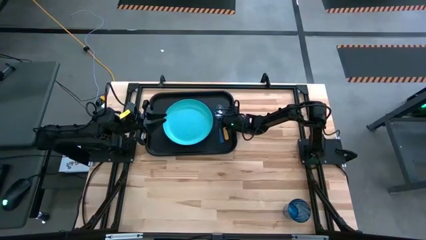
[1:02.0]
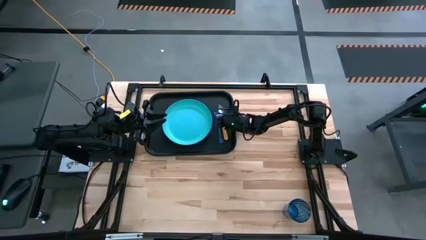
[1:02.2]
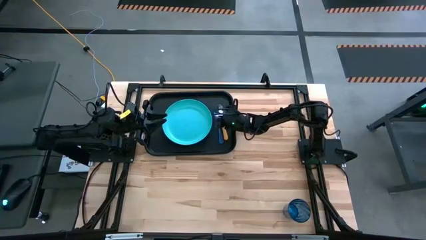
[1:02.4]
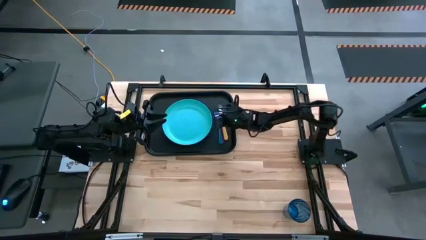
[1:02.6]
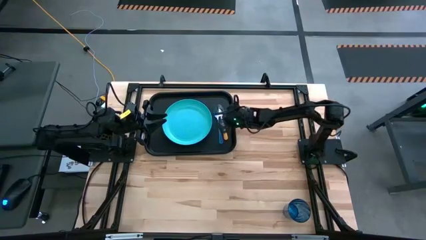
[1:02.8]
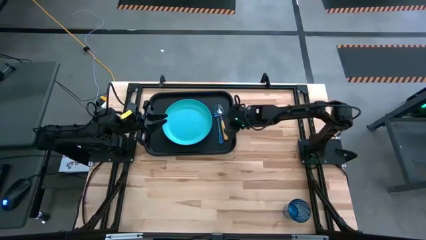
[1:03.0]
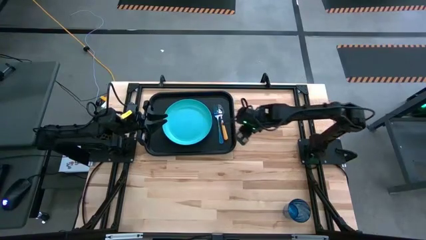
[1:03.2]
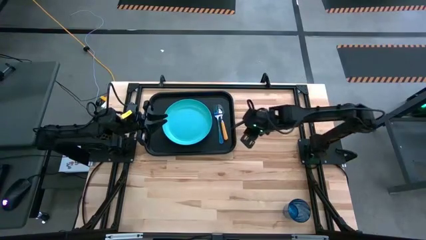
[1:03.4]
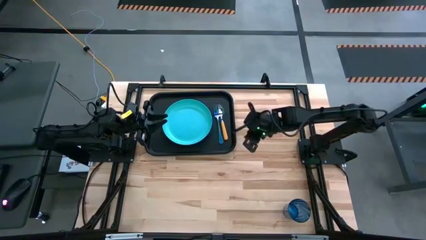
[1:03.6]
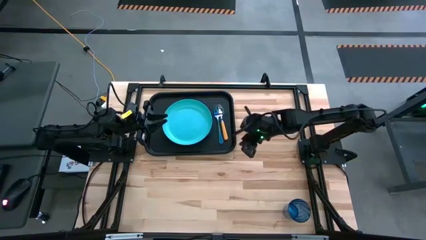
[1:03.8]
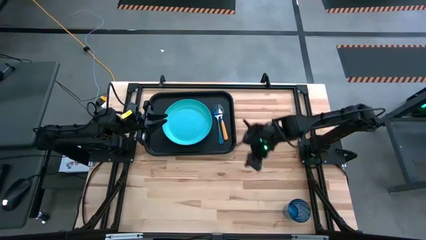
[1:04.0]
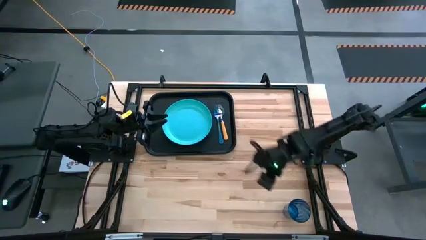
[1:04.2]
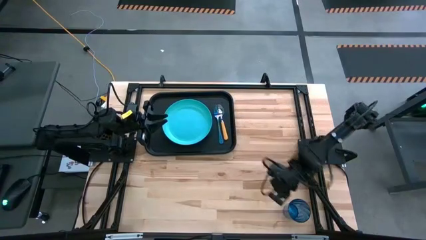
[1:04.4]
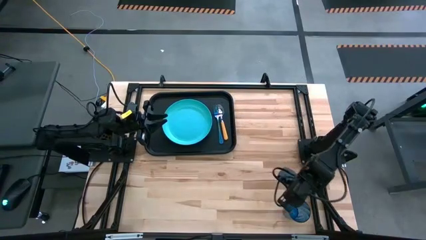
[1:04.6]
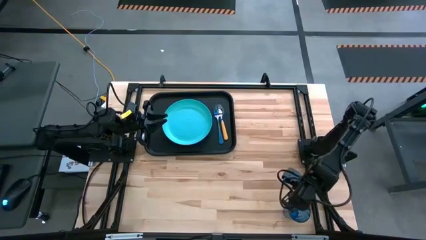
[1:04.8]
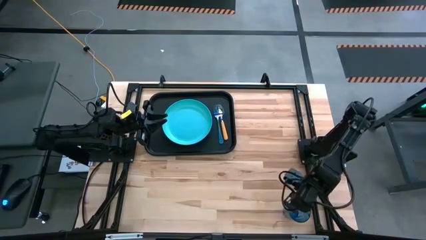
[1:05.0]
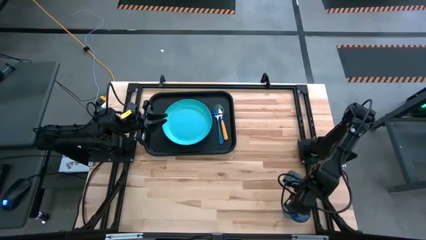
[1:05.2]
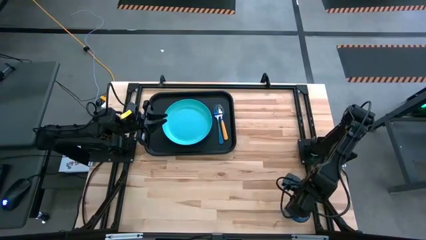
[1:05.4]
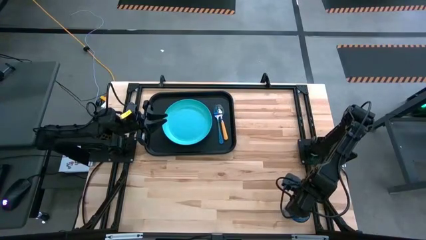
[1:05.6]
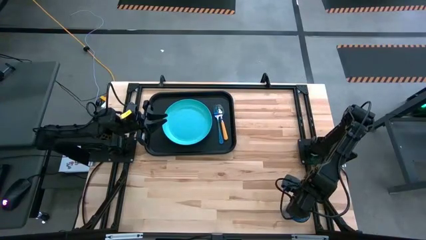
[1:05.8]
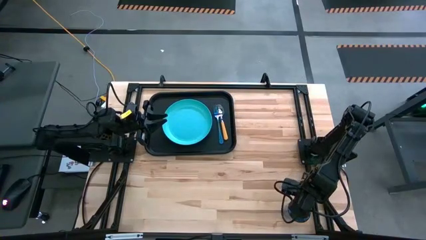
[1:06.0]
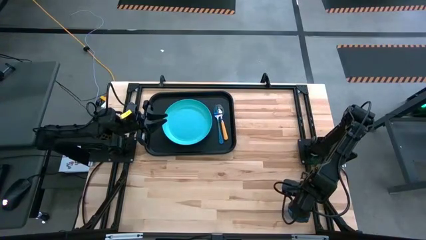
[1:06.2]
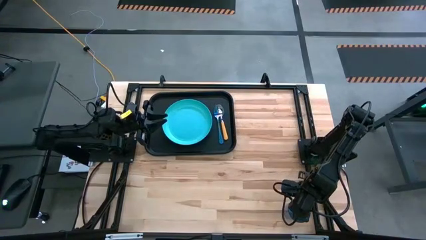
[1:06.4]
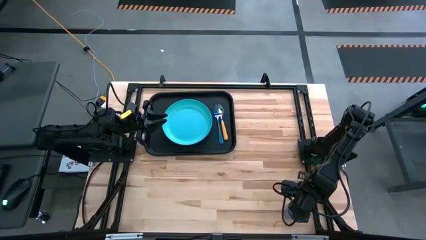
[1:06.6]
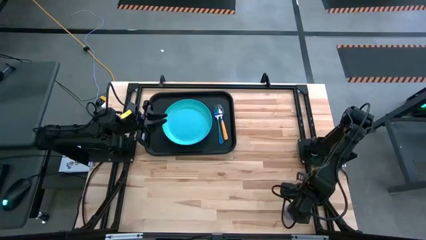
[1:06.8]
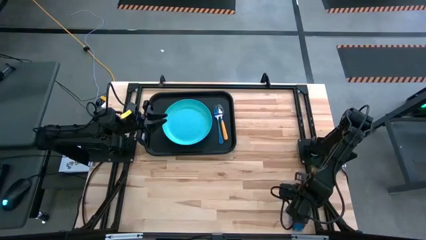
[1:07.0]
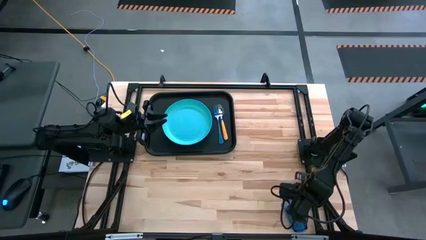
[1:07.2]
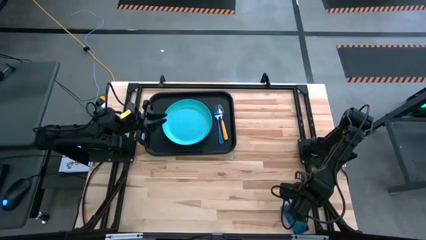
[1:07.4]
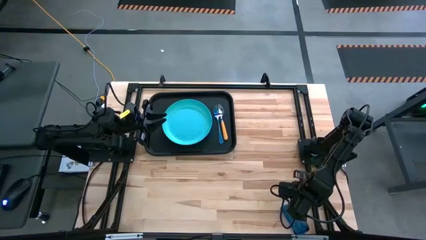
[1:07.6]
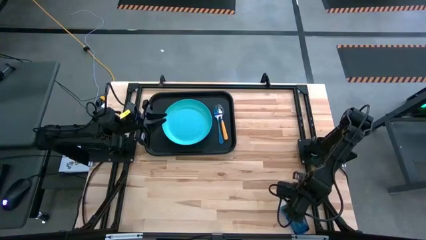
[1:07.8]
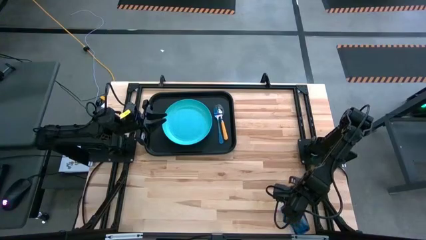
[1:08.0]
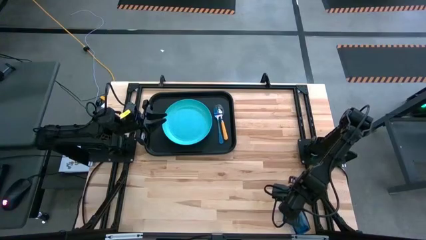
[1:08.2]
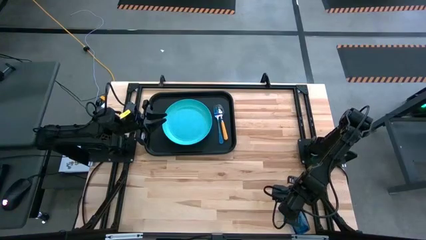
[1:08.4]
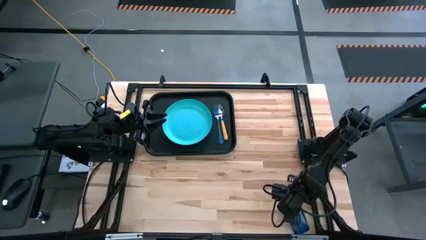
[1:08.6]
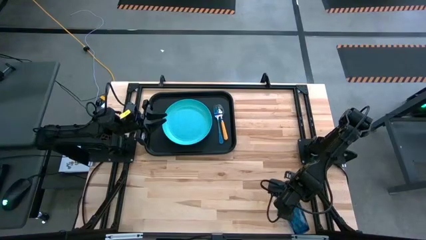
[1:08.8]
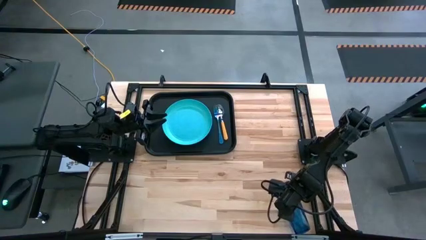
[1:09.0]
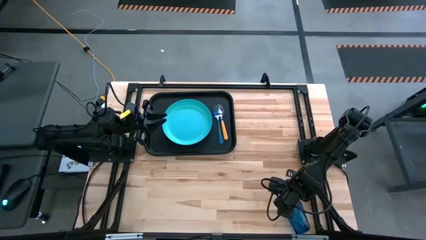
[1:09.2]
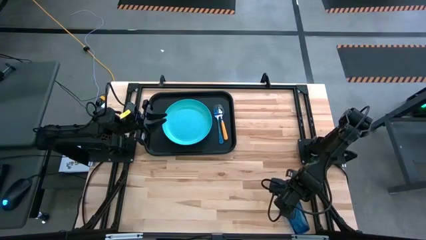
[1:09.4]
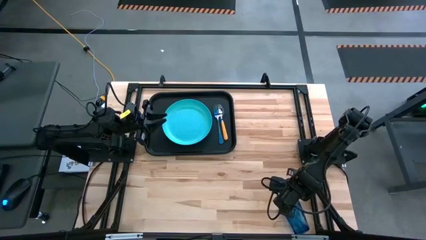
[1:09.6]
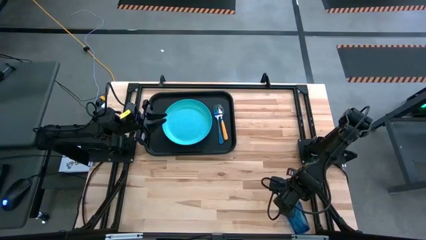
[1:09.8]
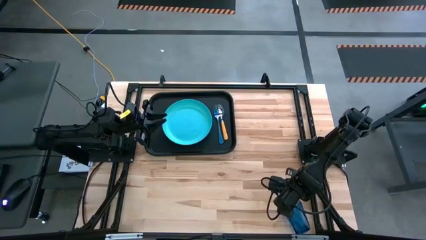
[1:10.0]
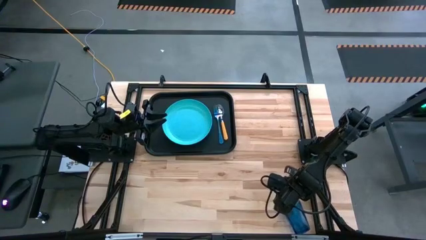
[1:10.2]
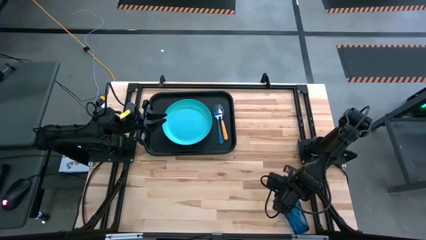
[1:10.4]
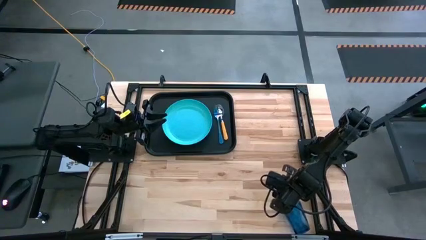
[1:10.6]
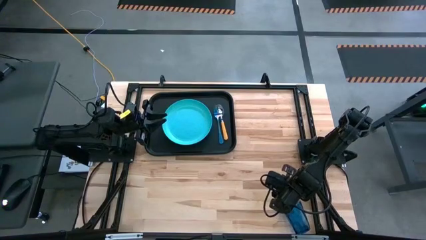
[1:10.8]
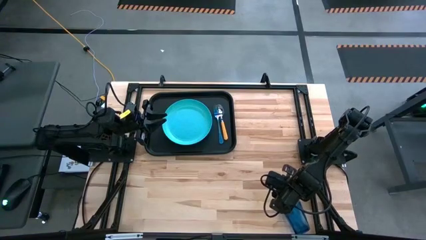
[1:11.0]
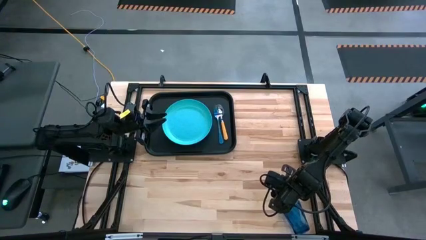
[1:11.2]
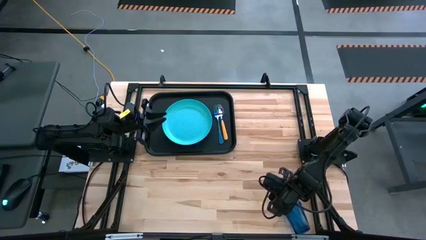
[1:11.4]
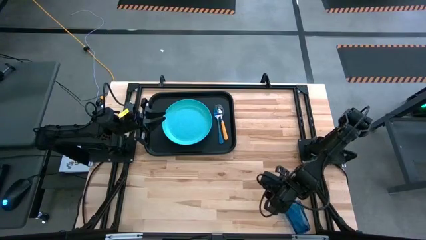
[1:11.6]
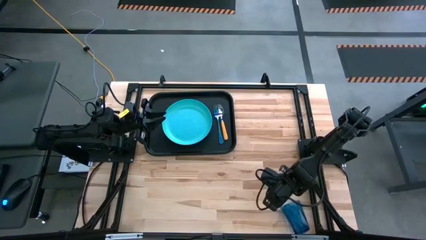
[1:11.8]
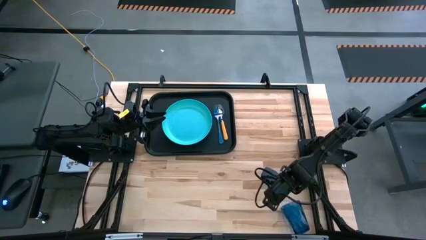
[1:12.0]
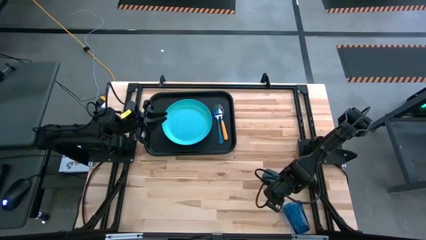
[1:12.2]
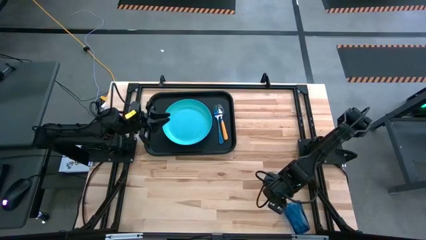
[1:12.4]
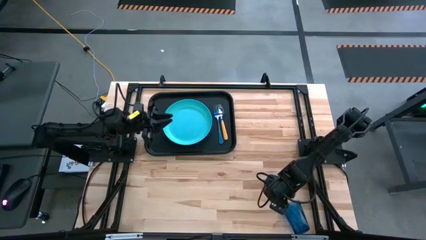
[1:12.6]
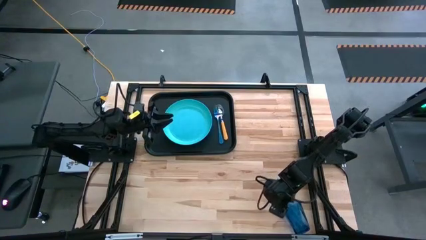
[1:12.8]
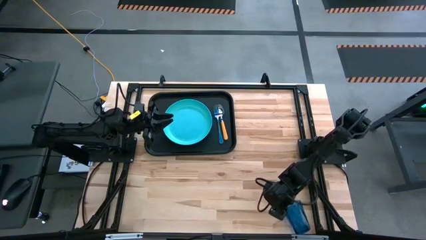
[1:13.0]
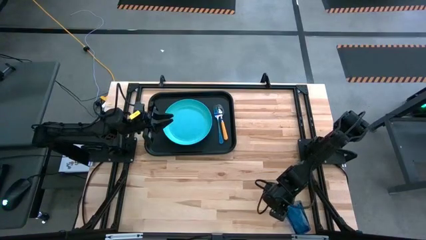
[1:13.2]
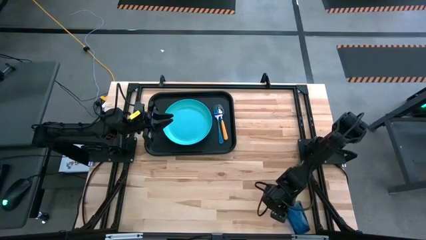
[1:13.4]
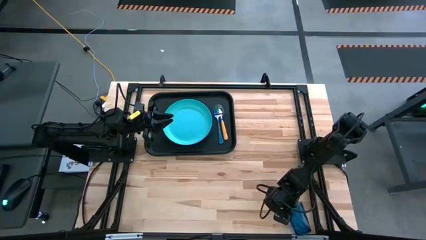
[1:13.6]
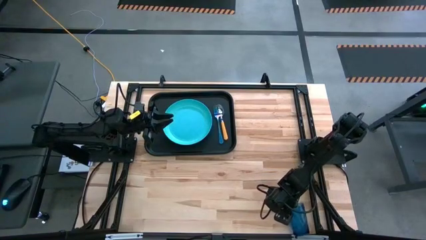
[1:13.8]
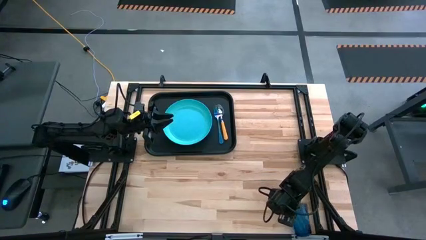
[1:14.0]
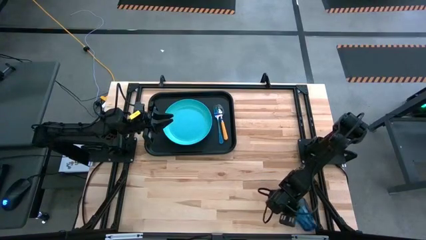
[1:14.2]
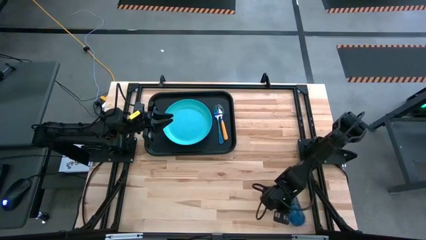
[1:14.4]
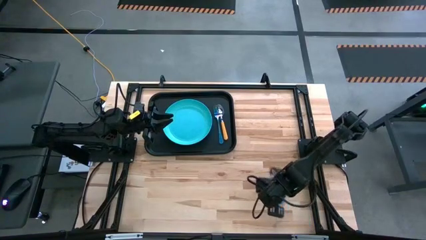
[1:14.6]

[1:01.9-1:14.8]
Task: Pick and place plate/cup/fork/spoon on tray
Put the blue cup on the black serving tray to the top left of the blue plate
